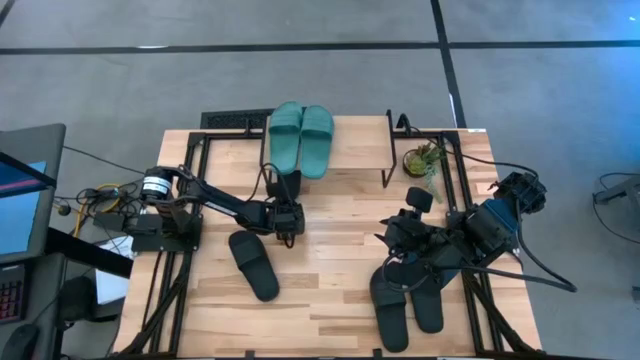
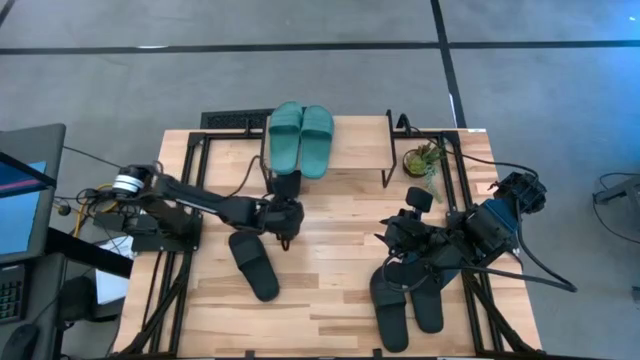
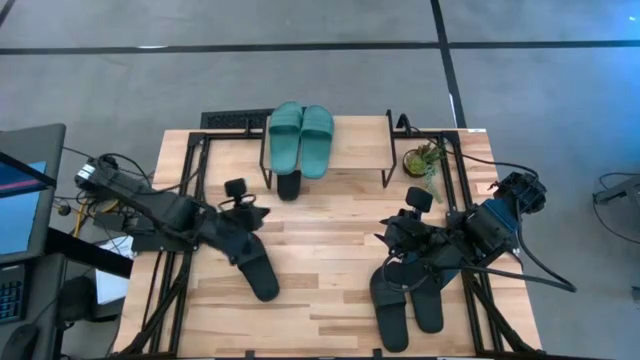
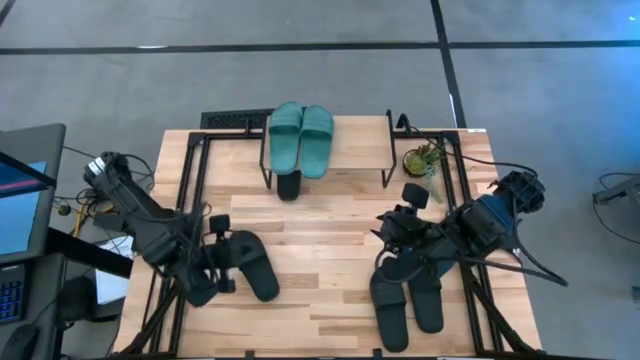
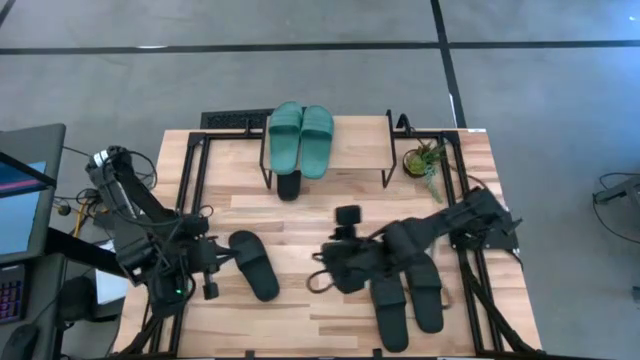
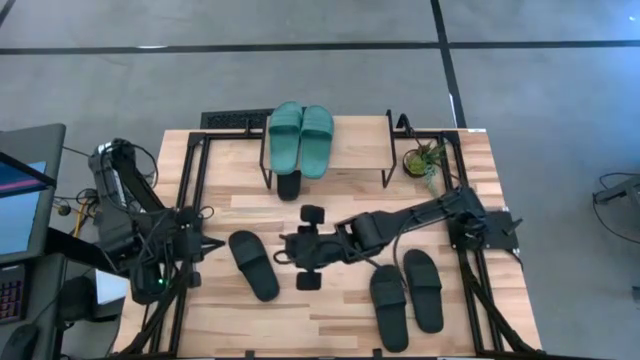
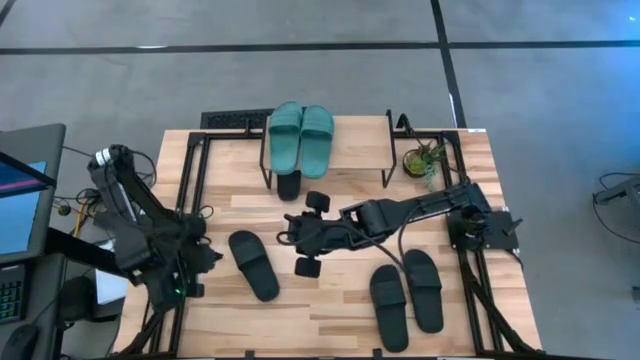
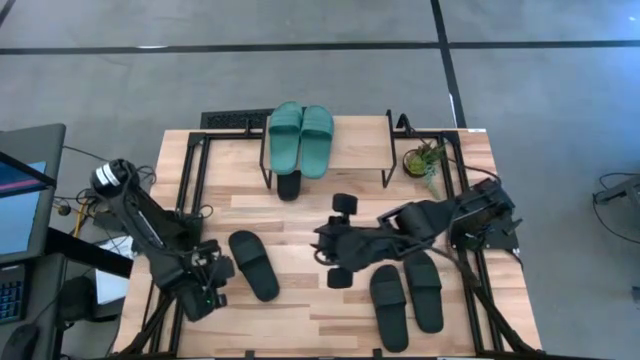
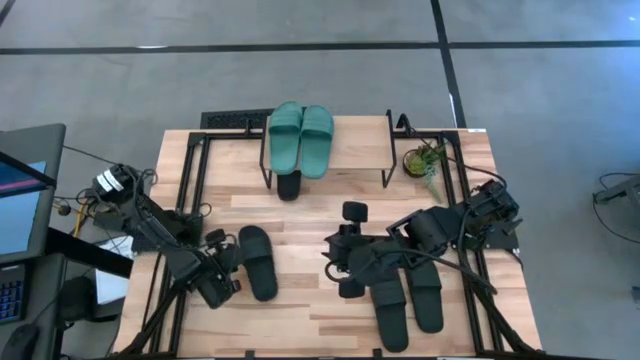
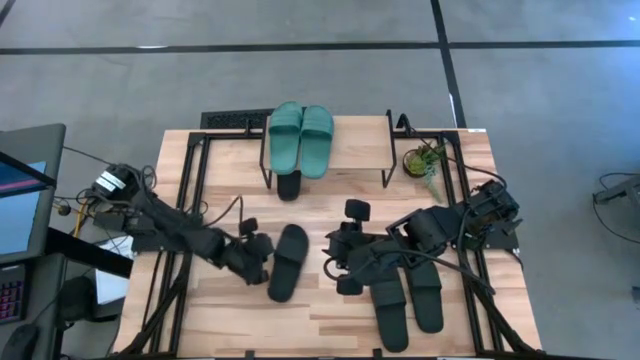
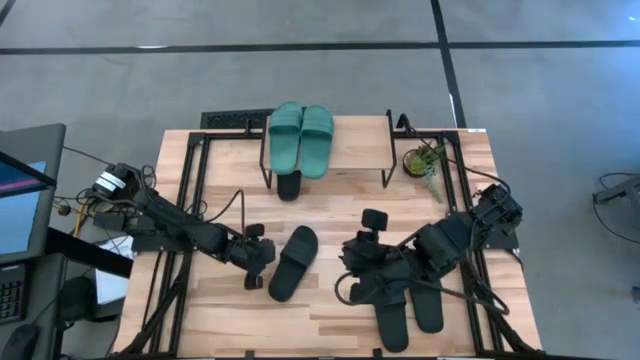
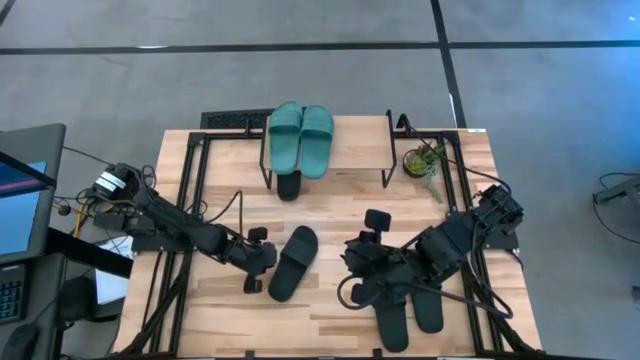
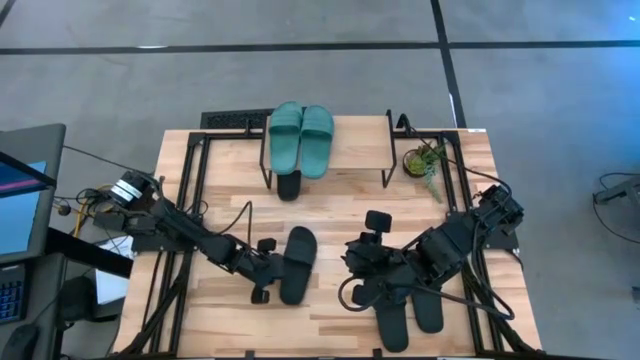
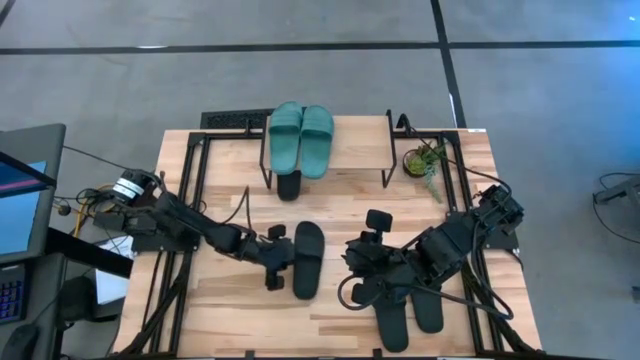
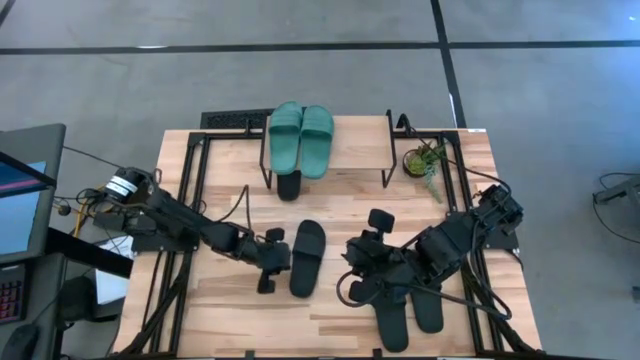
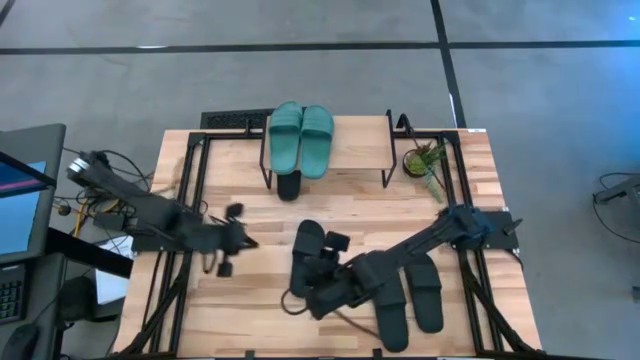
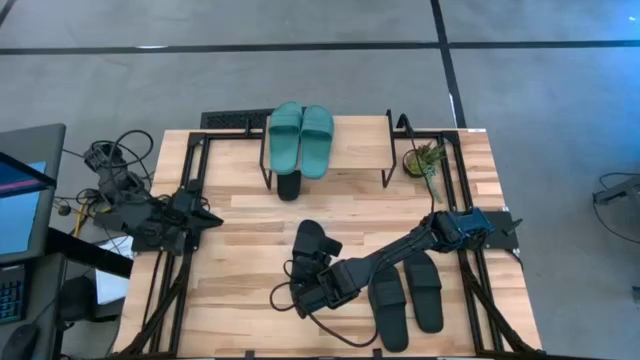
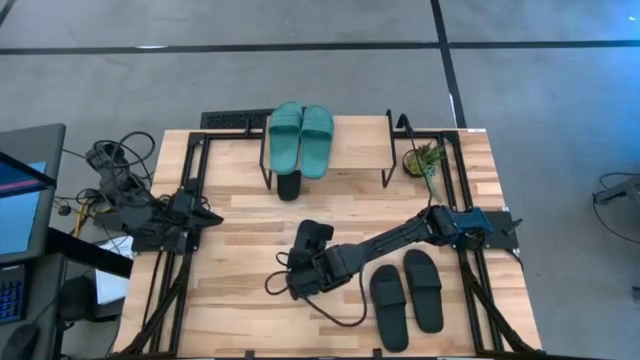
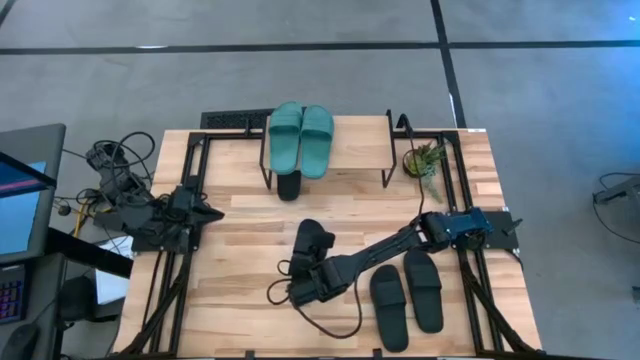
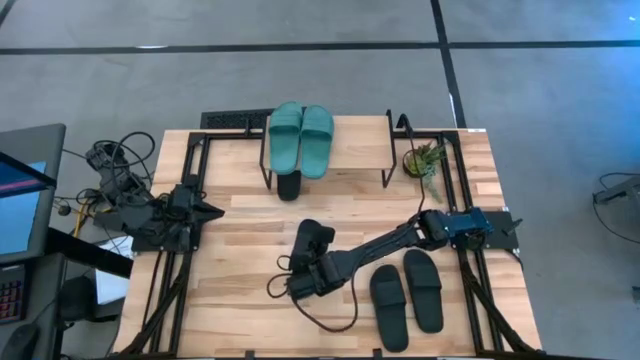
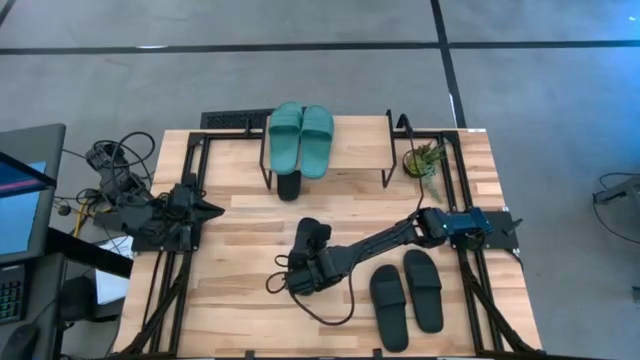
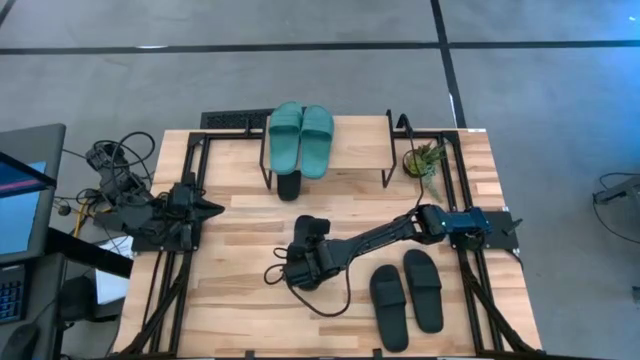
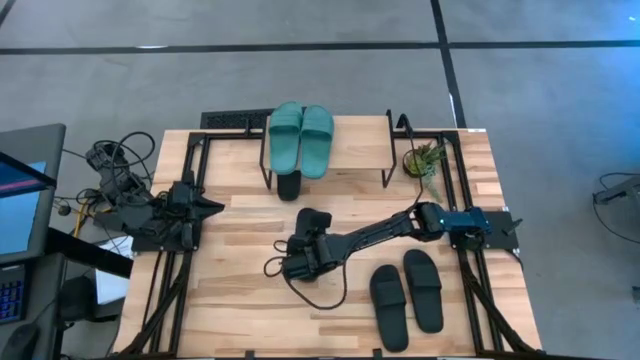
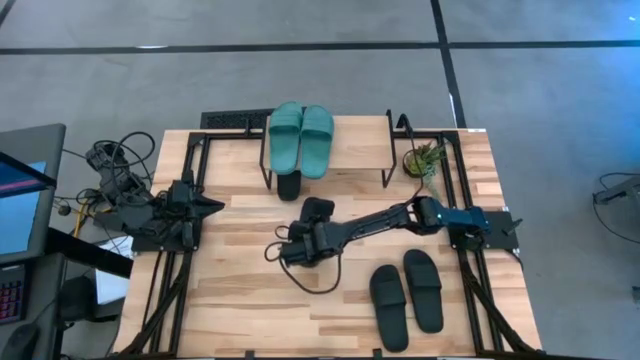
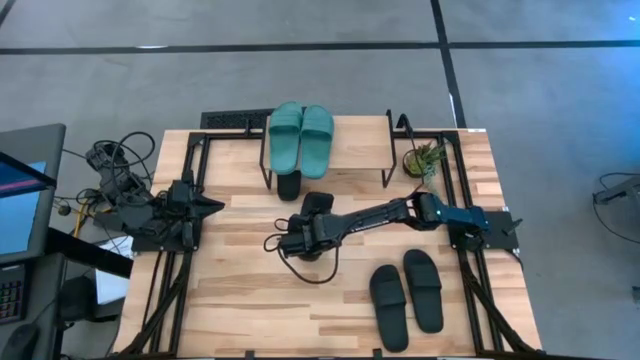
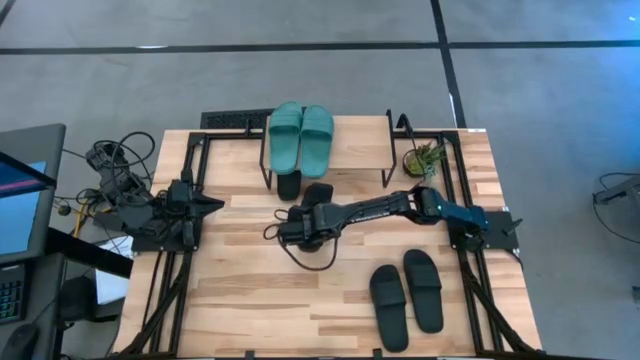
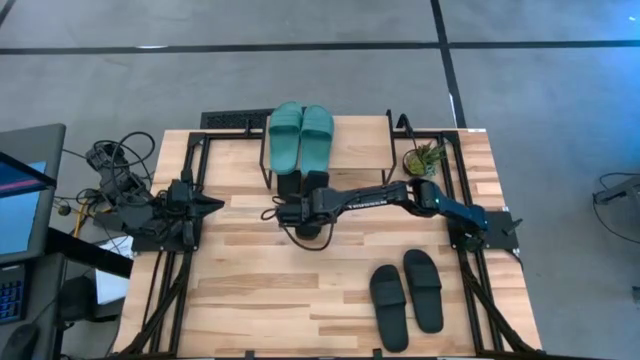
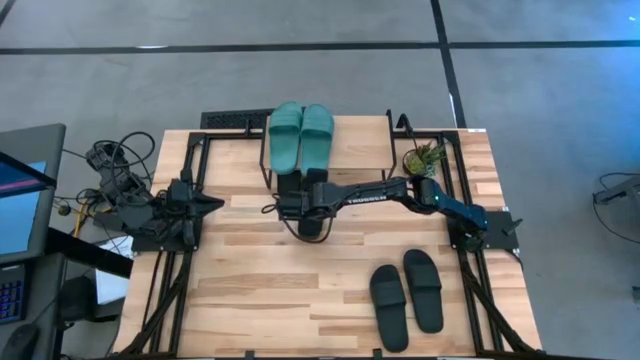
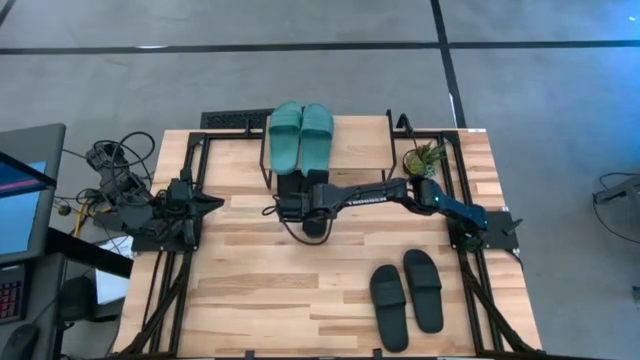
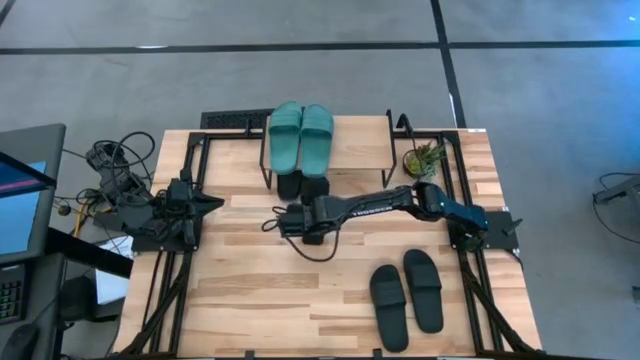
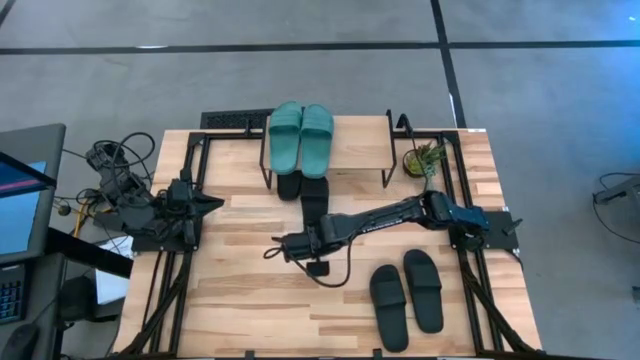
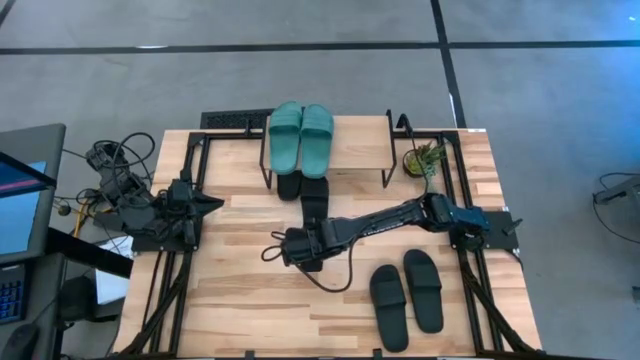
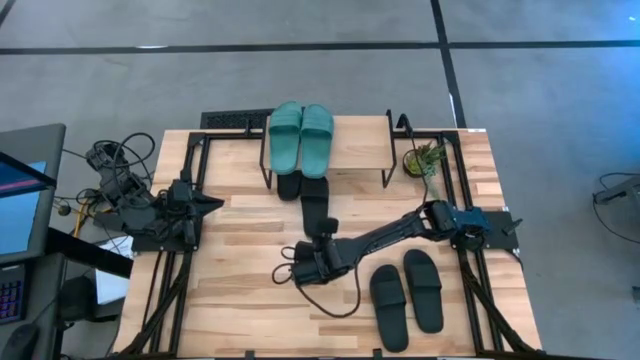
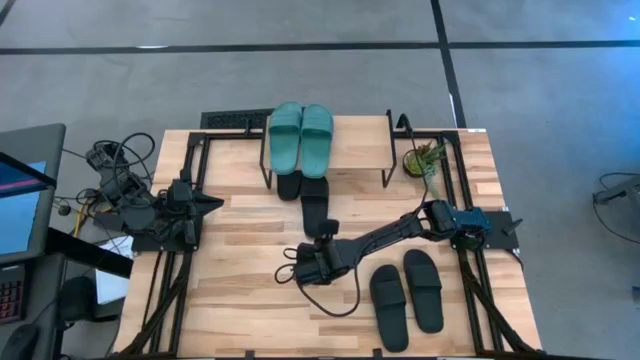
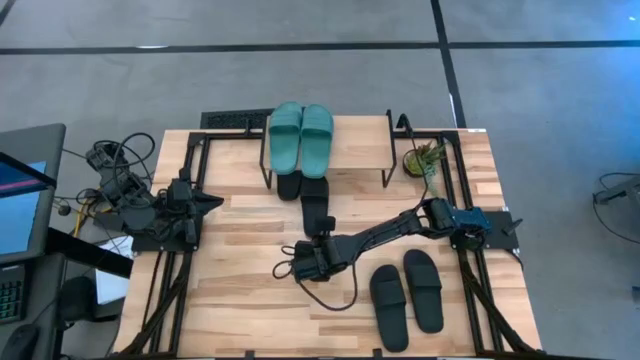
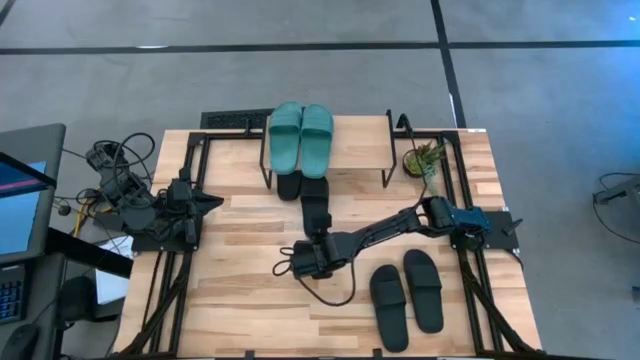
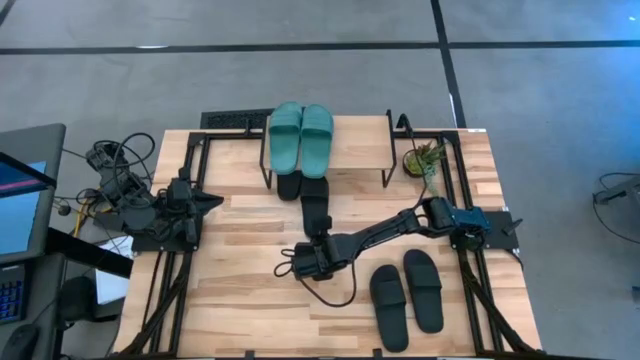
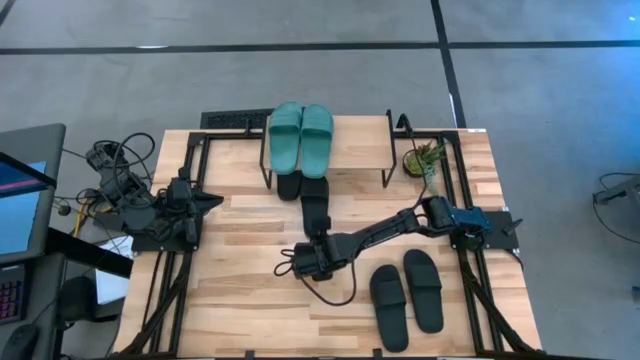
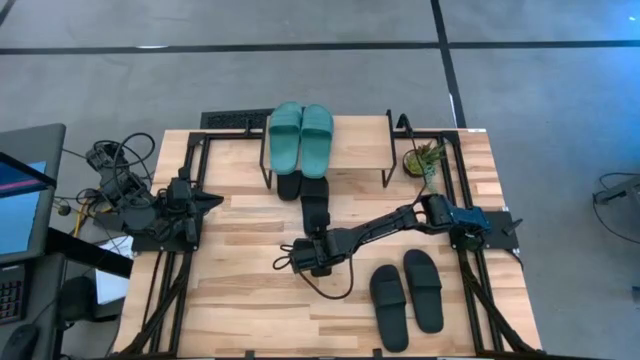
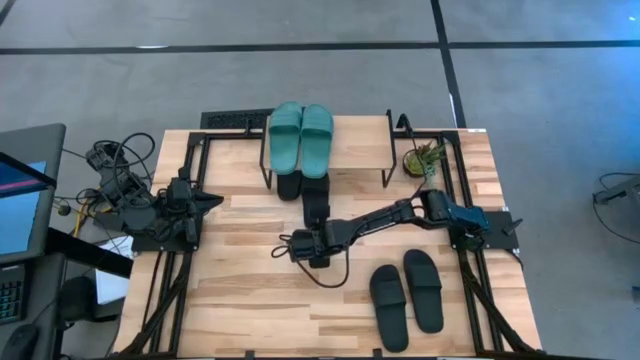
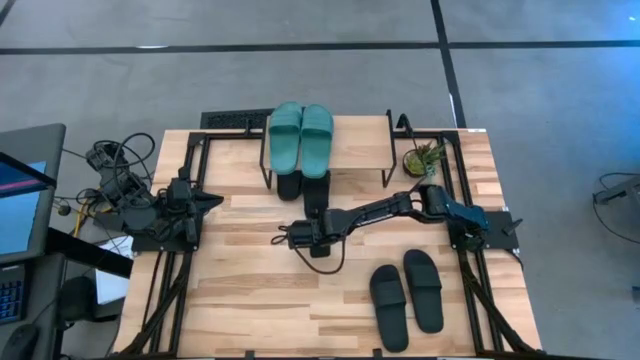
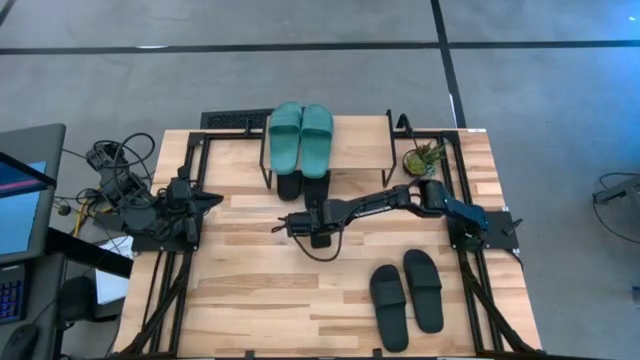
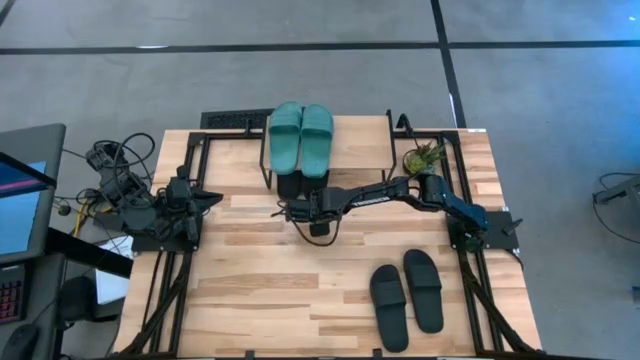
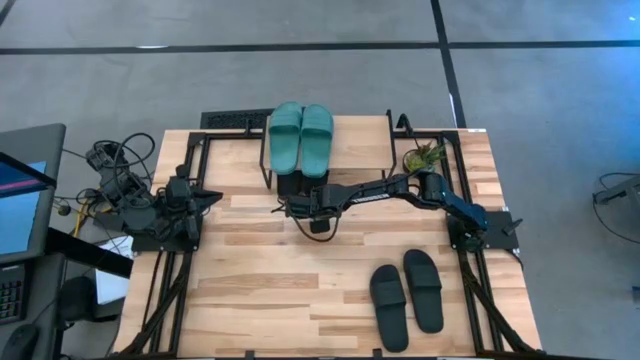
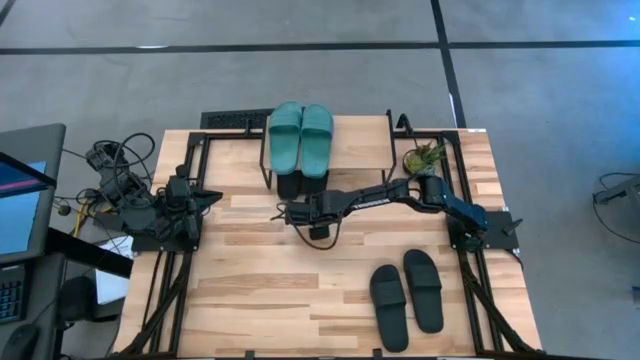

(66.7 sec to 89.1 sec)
Task: Pick and place slides into the shelf
Put the left black slide under the shelf
